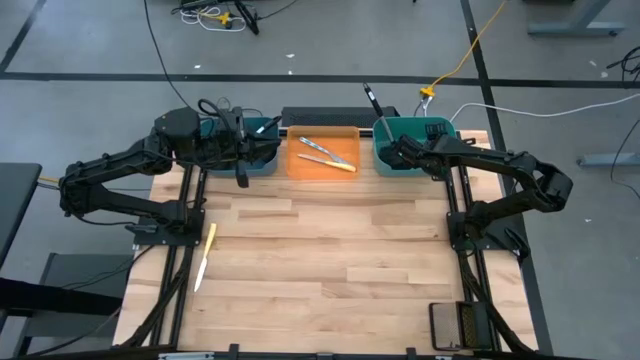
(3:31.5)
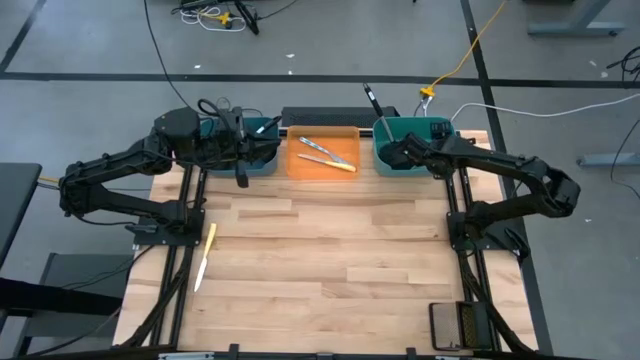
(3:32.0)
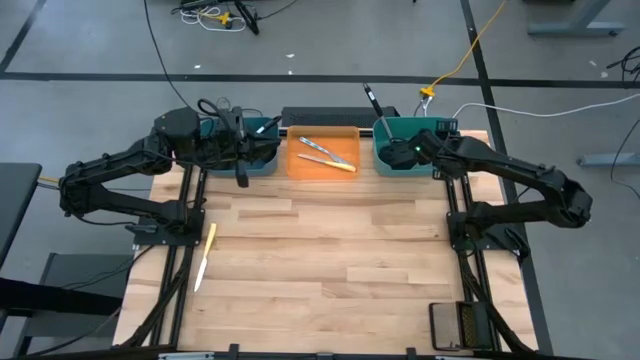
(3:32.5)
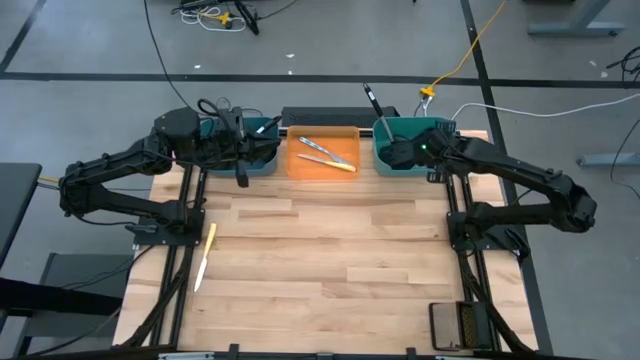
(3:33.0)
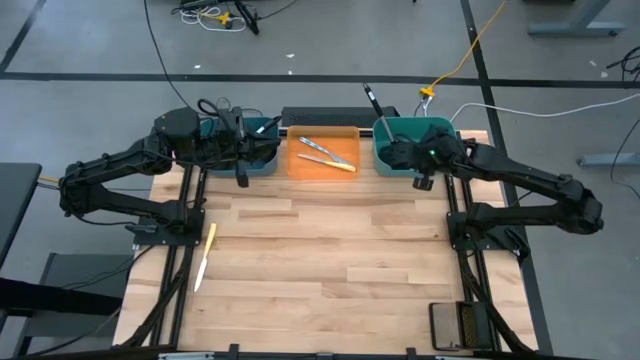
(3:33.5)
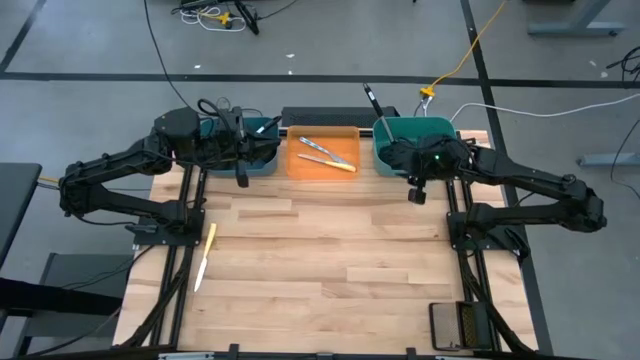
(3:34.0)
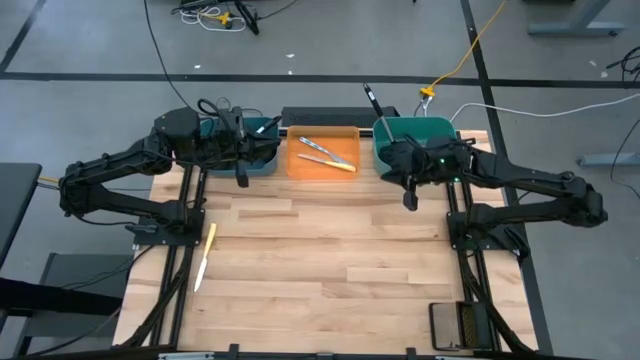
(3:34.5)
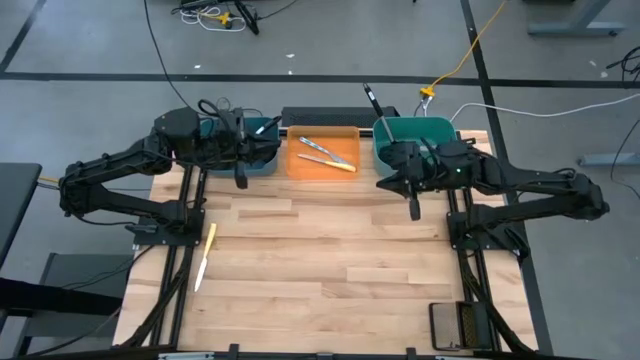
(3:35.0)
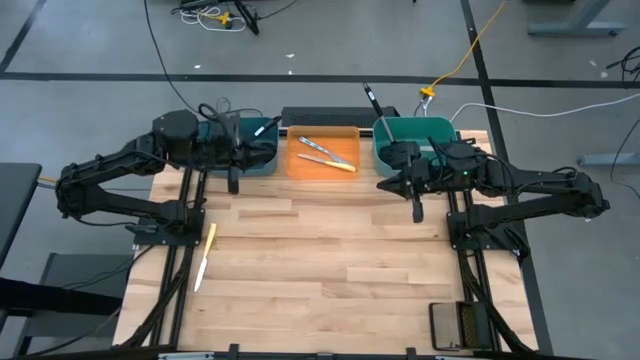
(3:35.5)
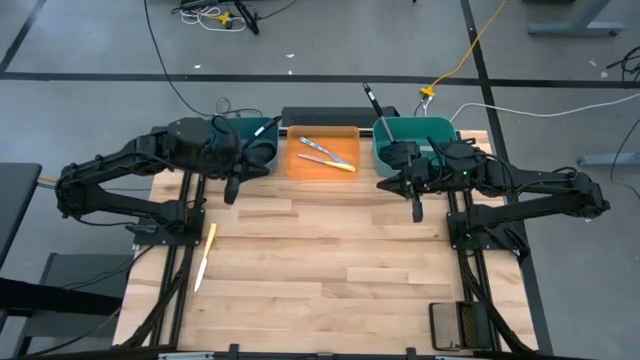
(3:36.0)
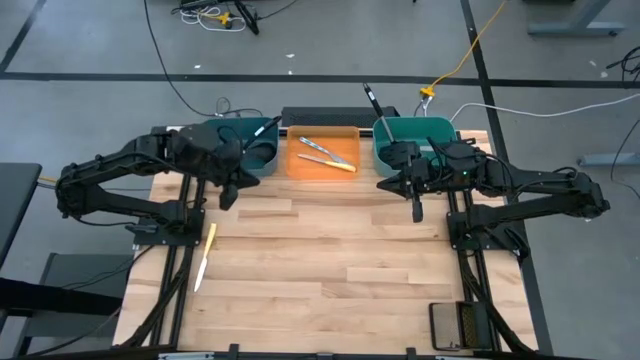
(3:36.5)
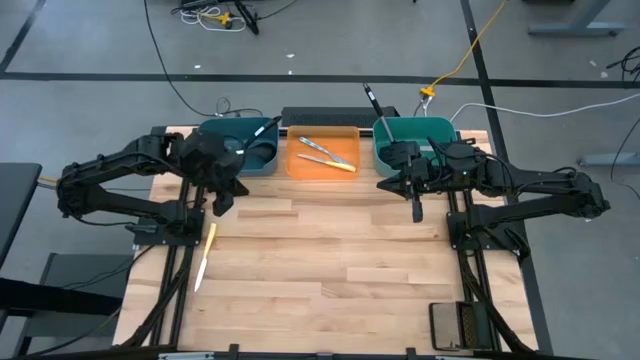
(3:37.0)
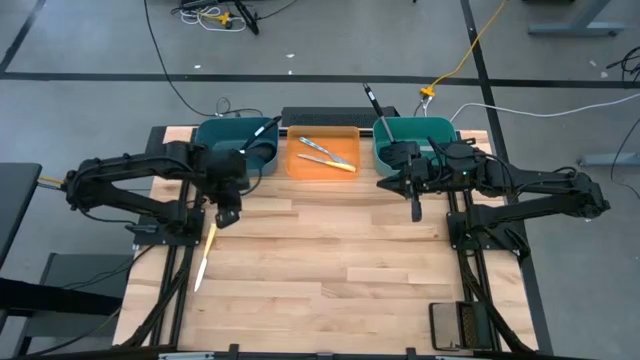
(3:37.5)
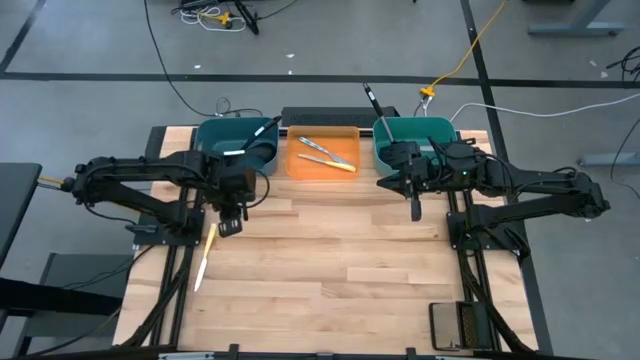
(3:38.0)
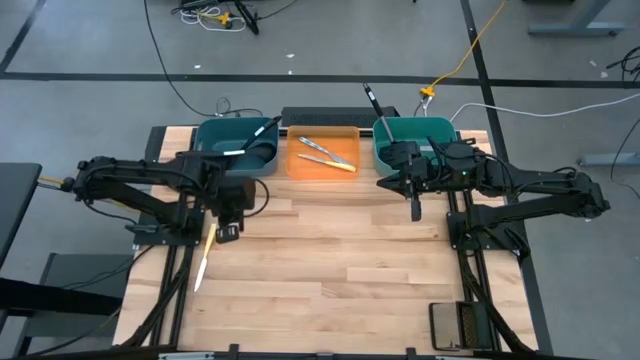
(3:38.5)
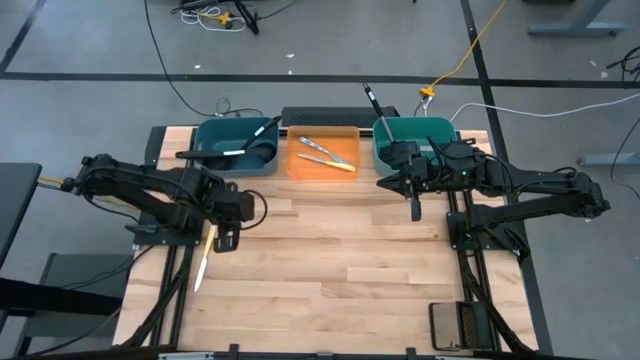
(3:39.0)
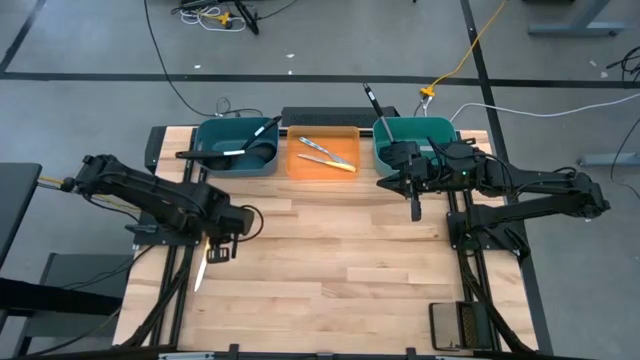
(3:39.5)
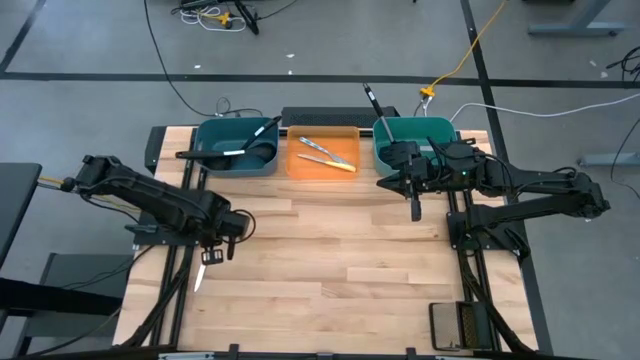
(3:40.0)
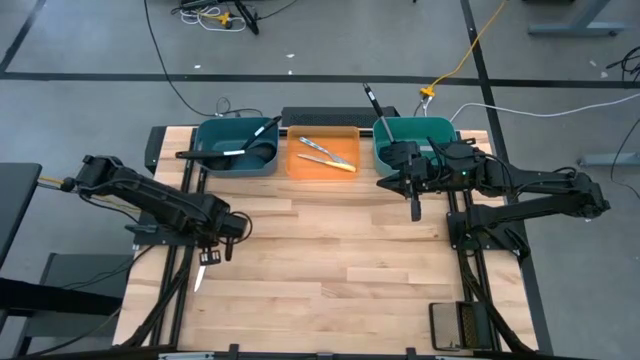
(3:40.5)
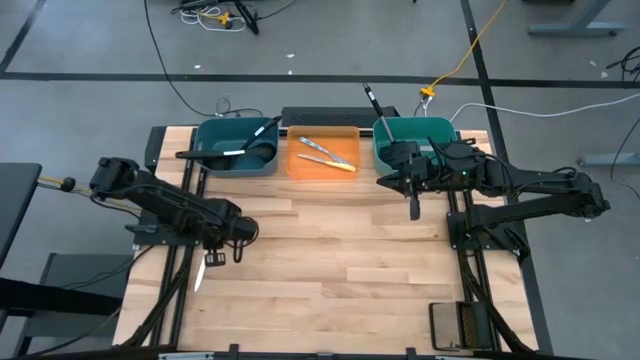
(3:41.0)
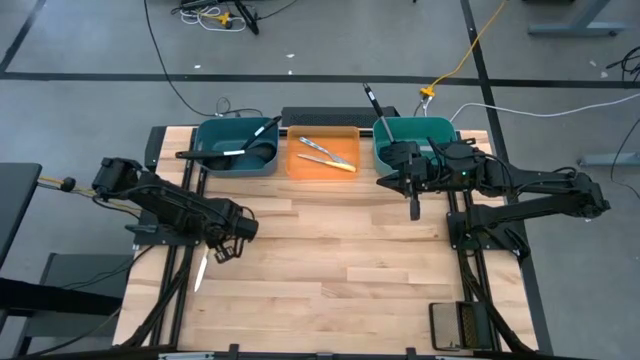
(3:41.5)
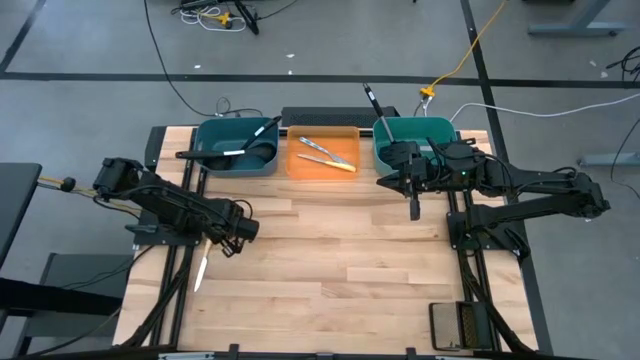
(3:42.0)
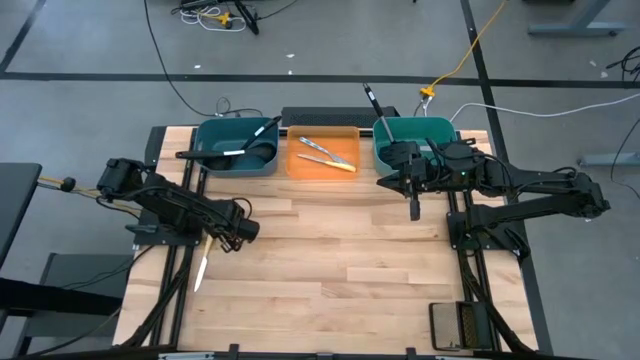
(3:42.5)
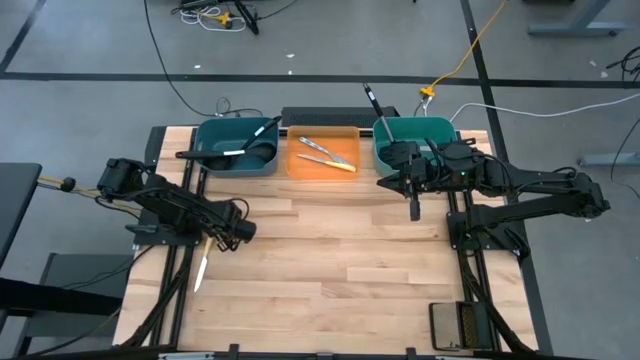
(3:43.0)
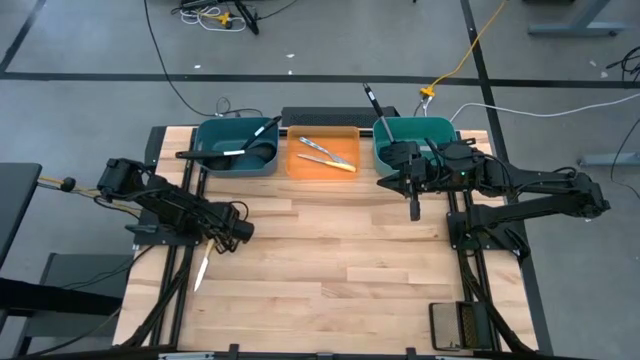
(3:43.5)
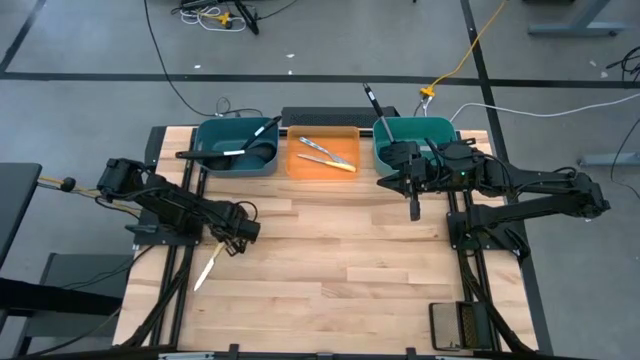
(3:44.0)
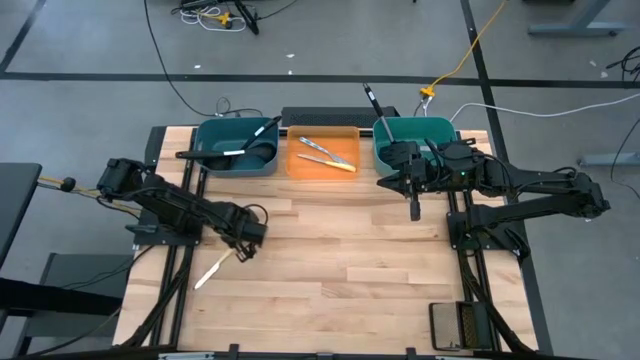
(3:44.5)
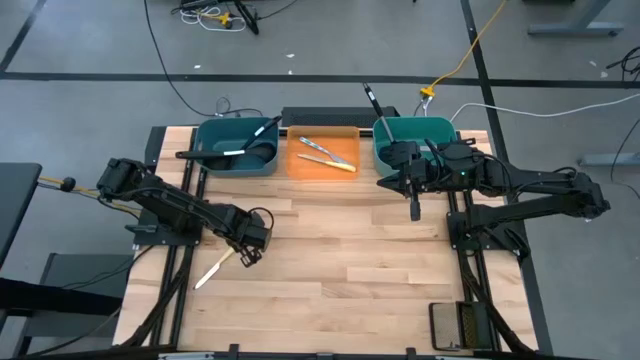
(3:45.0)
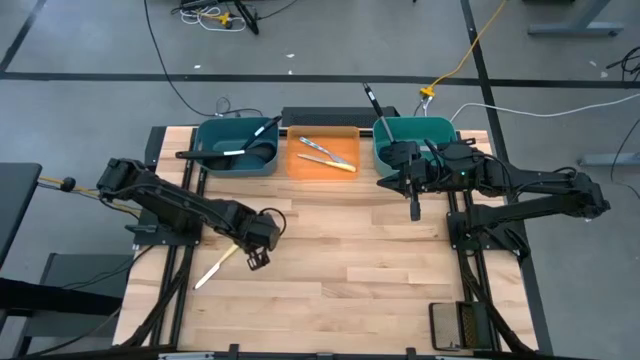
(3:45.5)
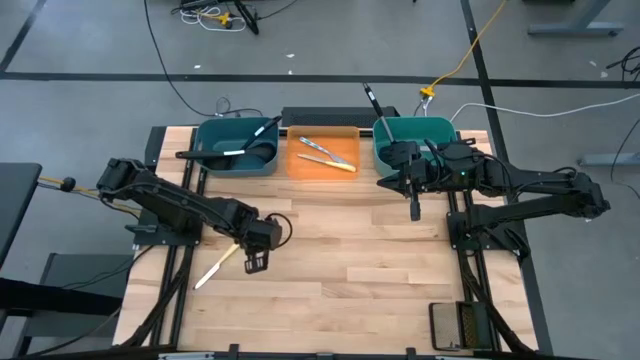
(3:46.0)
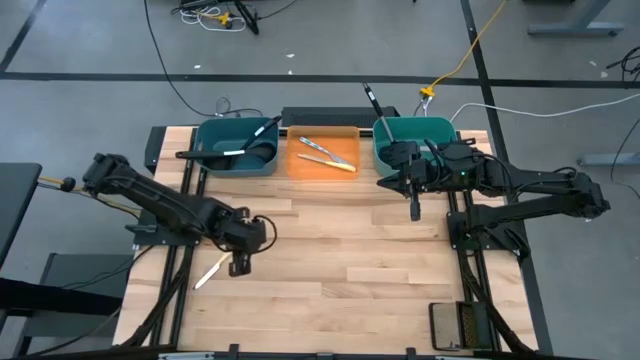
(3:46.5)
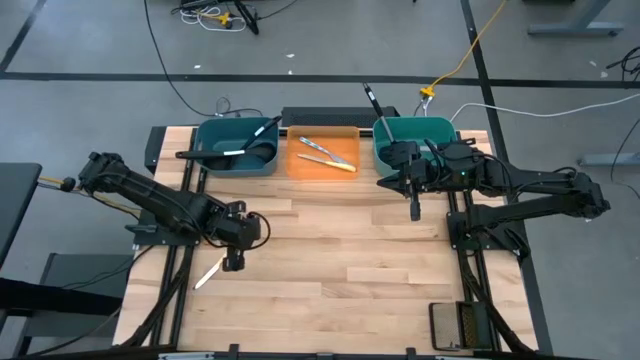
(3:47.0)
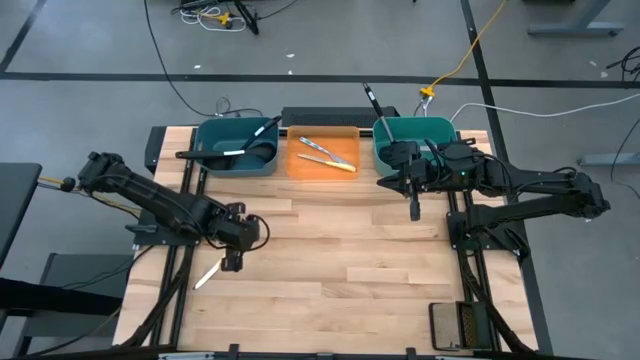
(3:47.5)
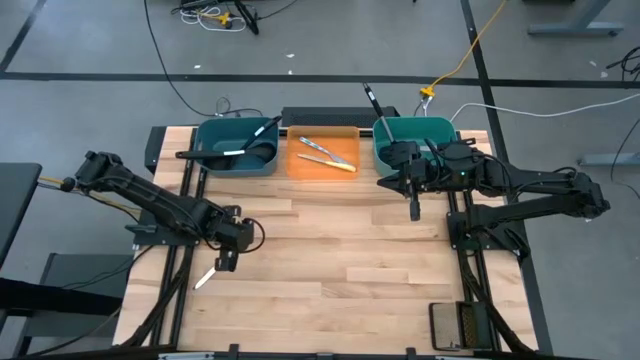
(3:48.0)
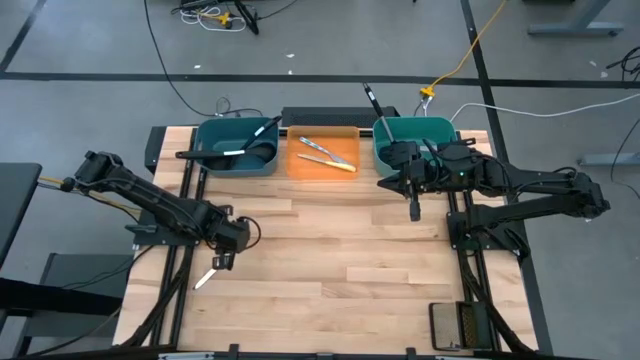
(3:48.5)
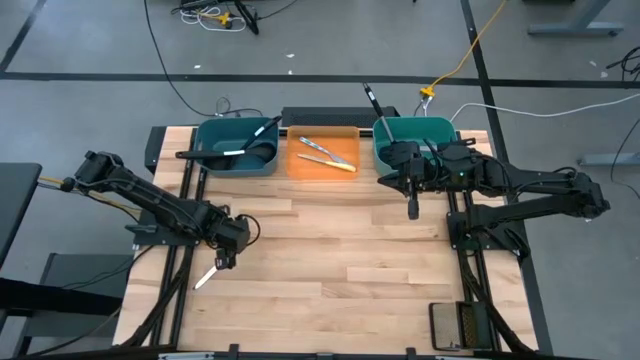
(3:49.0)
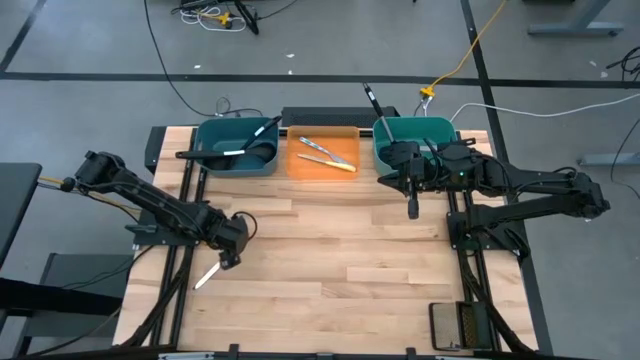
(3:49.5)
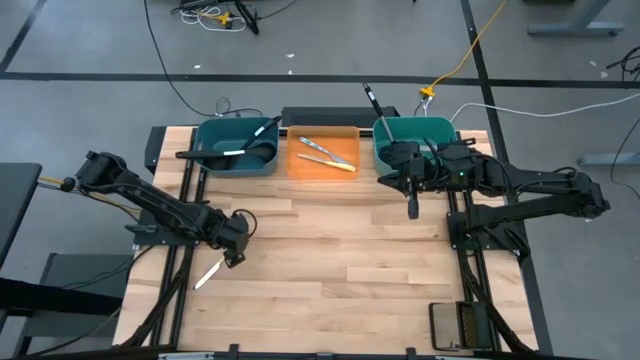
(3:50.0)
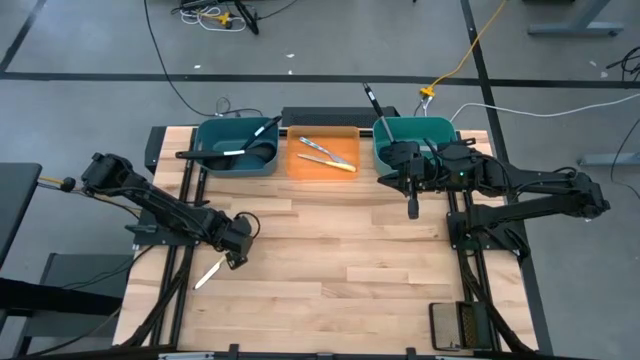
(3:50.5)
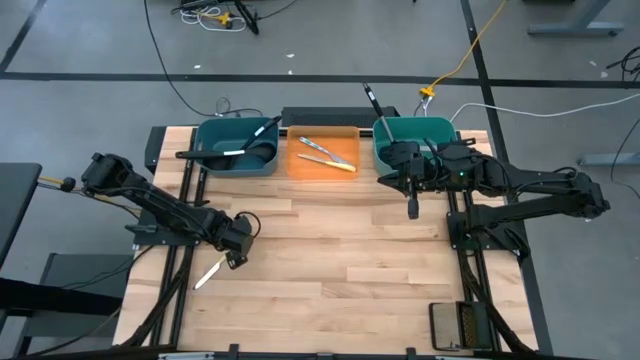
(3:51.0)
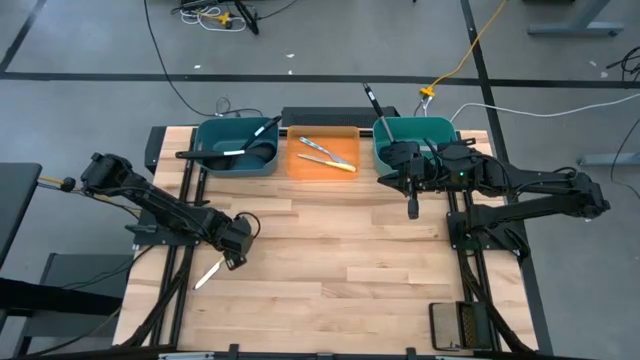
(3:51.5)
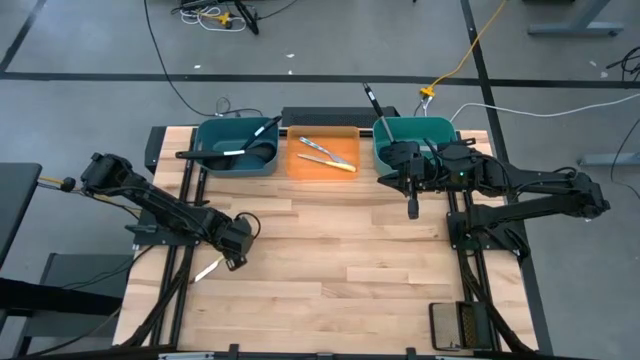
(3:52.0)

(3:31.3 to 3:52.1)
Task: Pick & Place Kitchen Items
Put the yellow knife into the orange bin

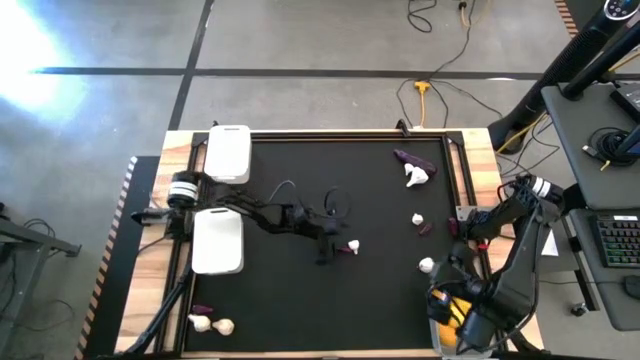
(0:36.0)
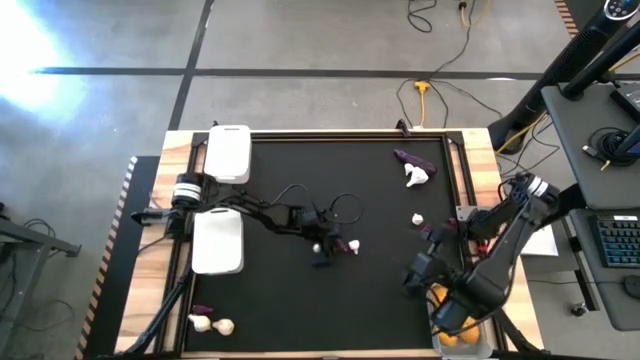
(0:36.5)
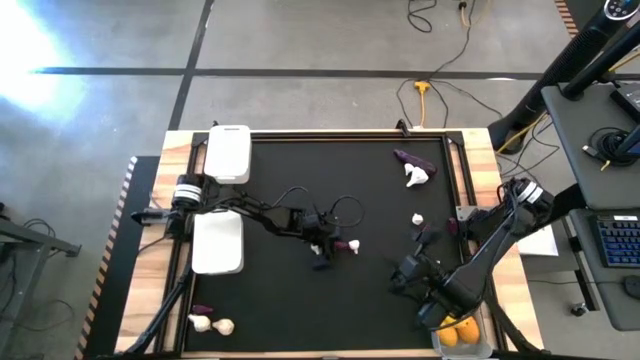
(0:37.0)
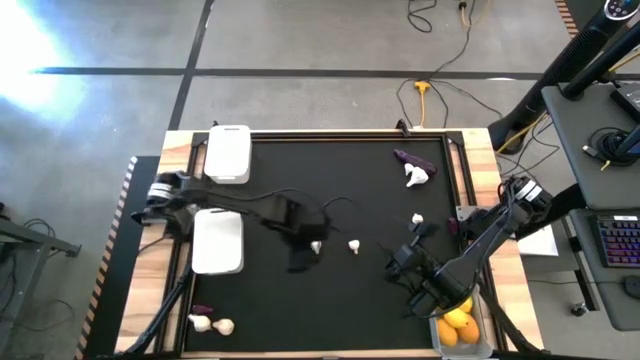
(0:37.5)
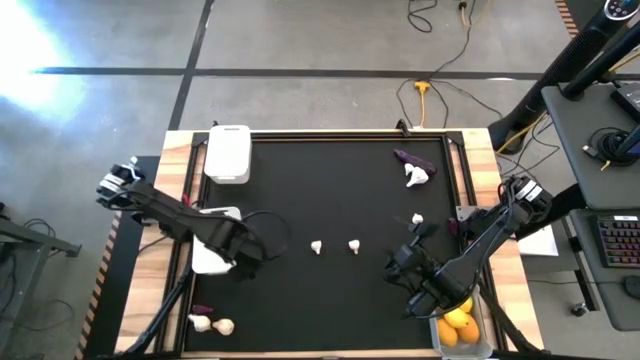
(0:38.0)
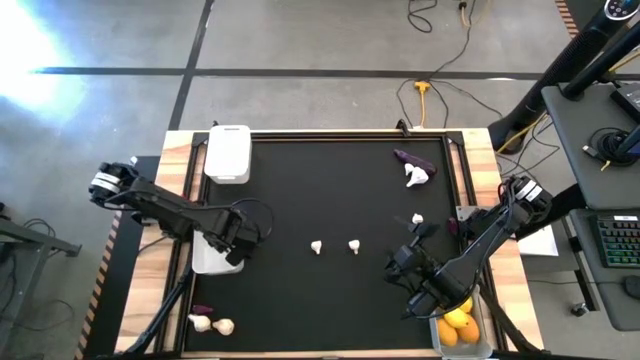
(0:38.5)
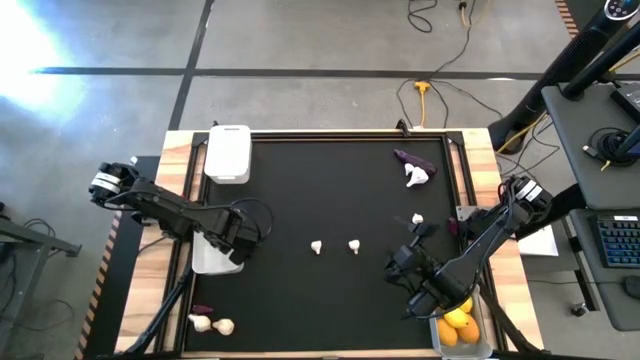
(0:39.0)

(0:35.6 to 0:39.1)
Task: Sort produce into baskets
Put the eggplant into the bottom white bin
